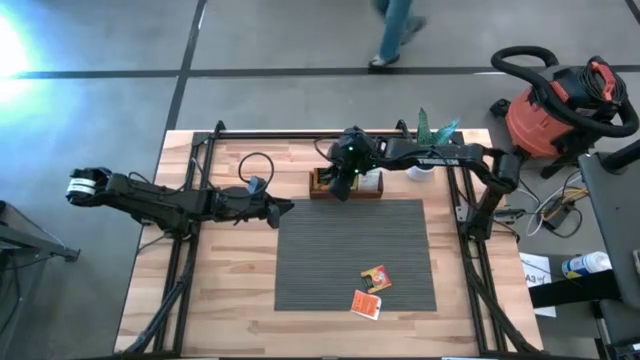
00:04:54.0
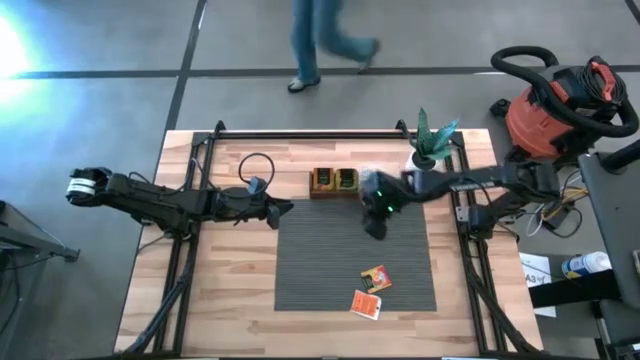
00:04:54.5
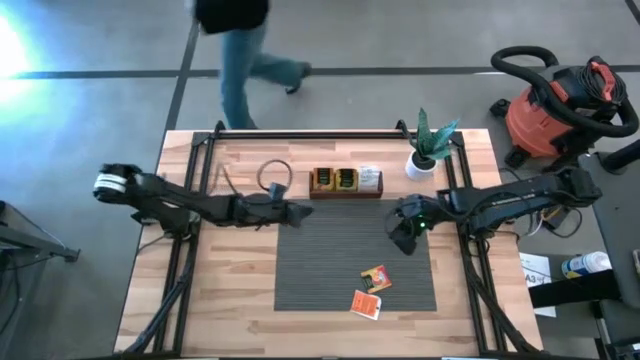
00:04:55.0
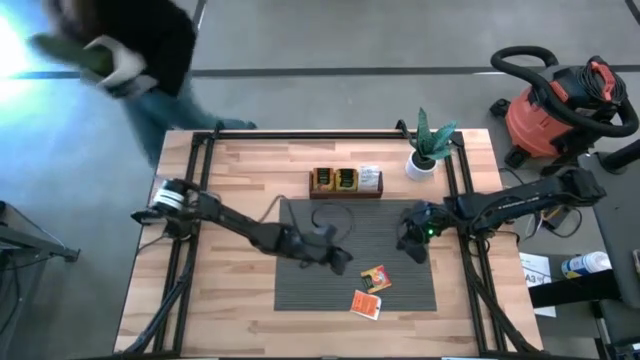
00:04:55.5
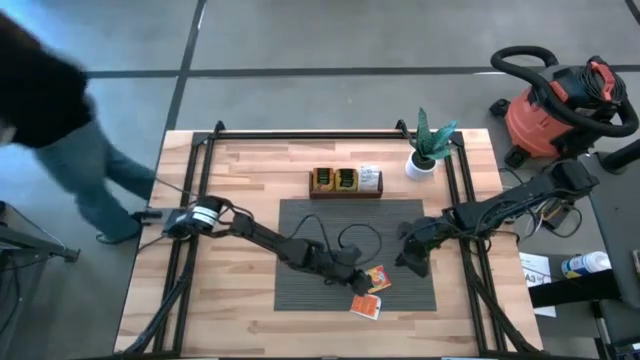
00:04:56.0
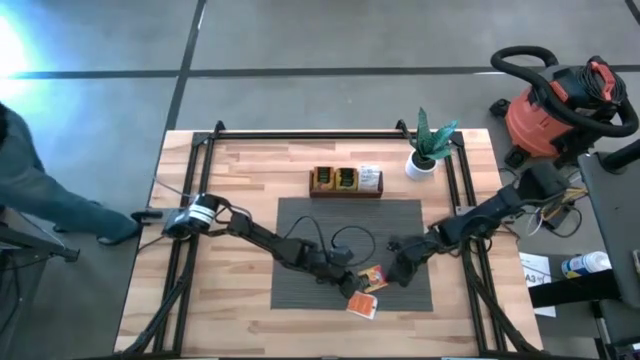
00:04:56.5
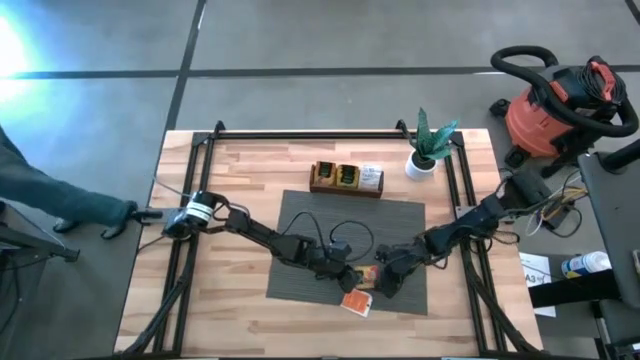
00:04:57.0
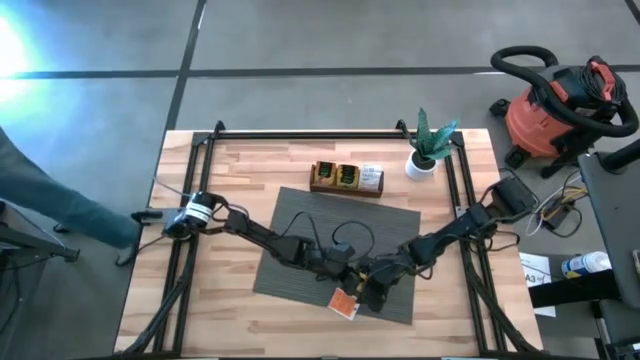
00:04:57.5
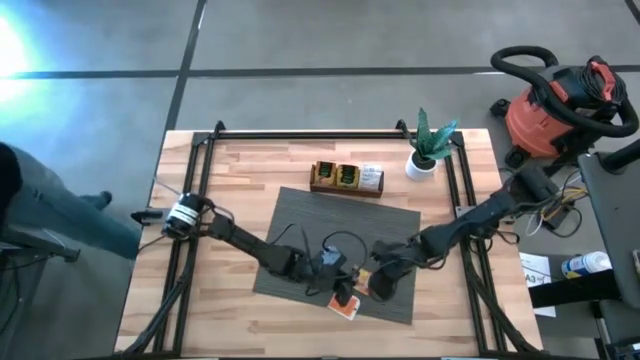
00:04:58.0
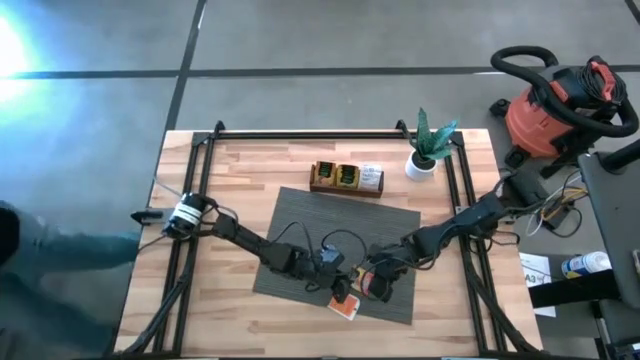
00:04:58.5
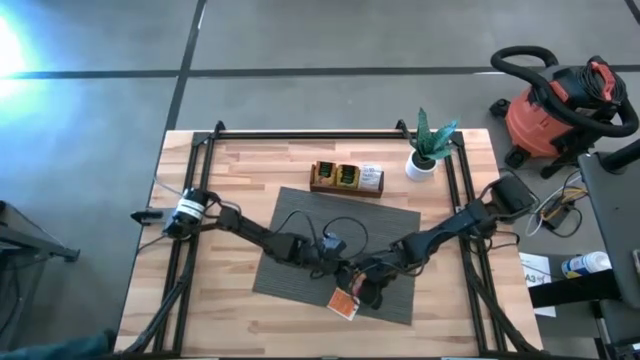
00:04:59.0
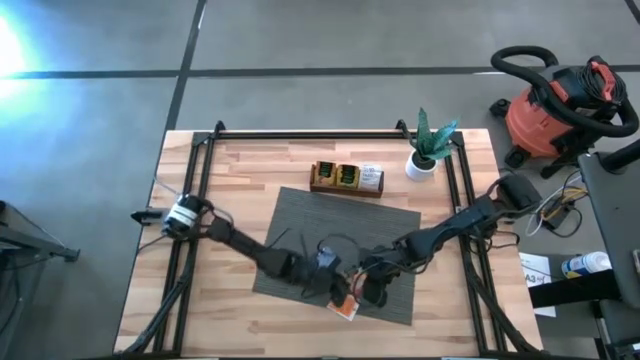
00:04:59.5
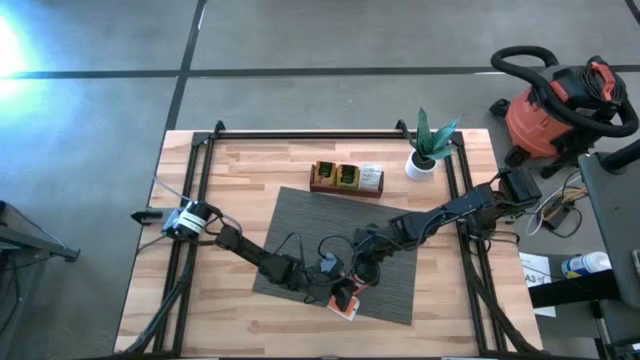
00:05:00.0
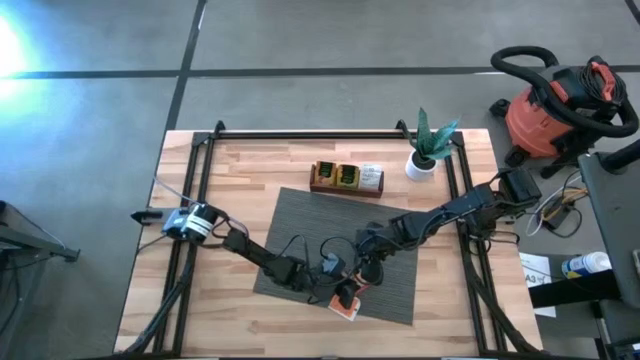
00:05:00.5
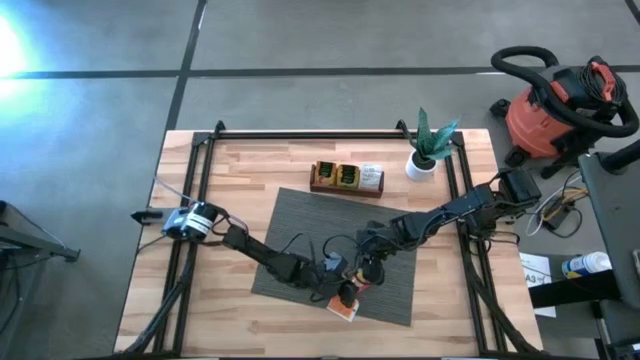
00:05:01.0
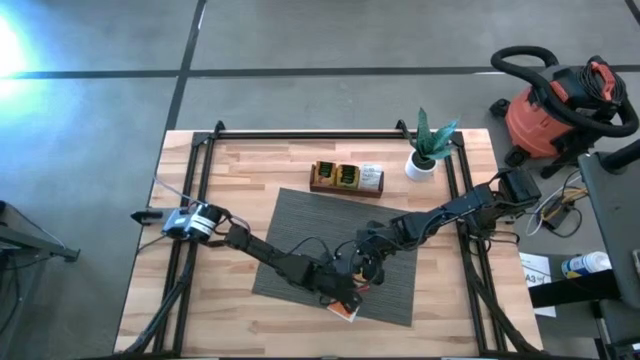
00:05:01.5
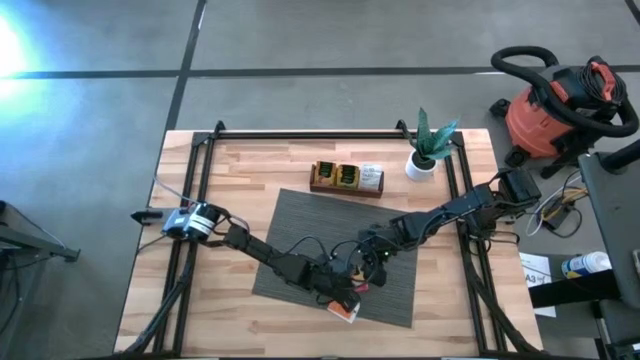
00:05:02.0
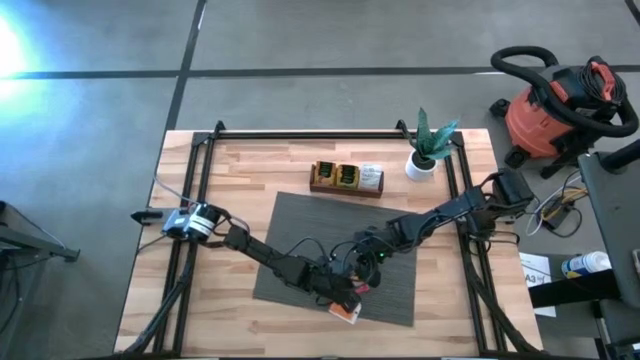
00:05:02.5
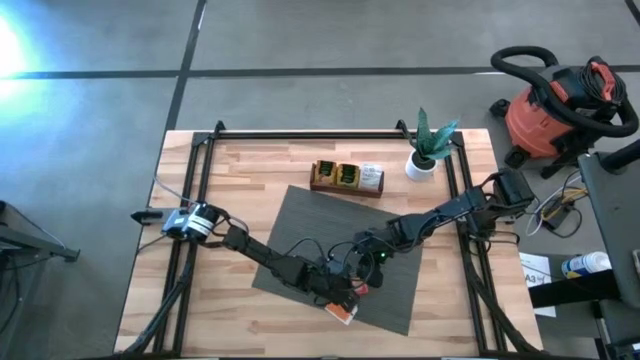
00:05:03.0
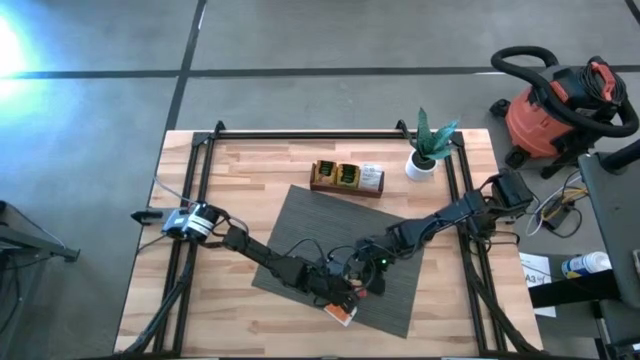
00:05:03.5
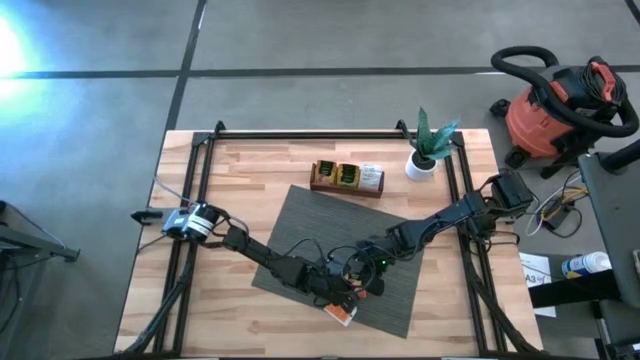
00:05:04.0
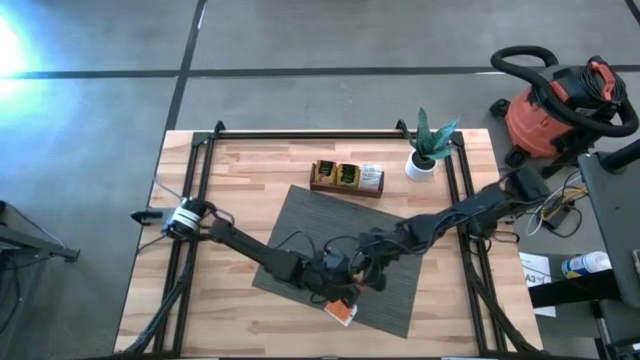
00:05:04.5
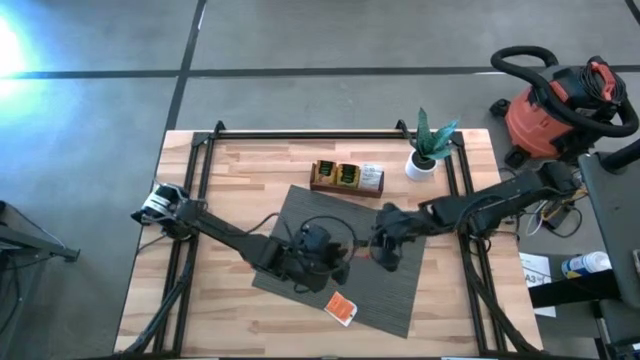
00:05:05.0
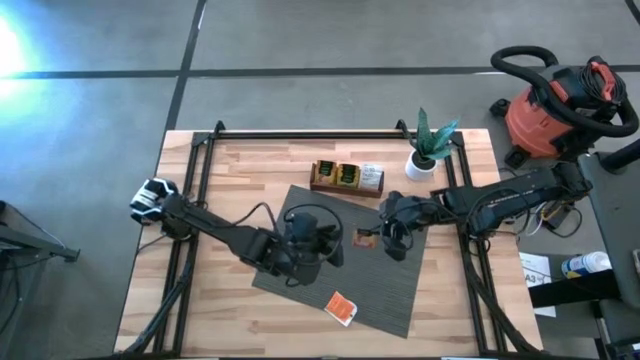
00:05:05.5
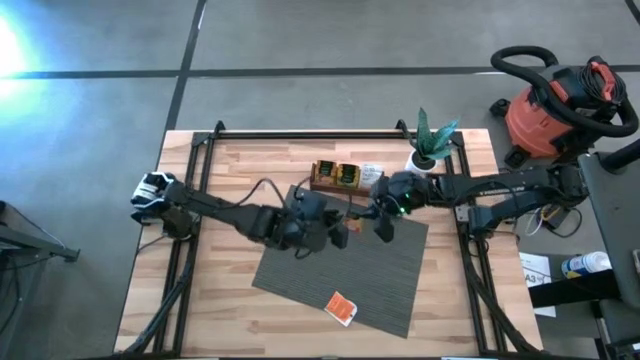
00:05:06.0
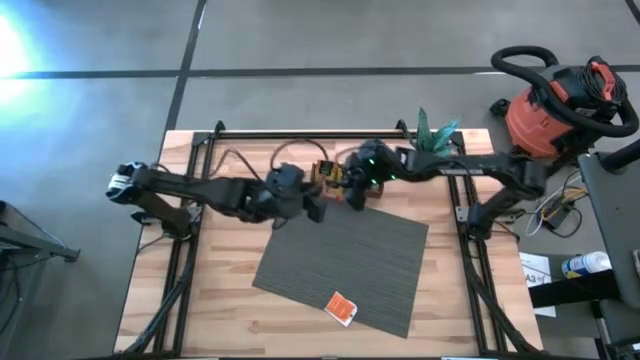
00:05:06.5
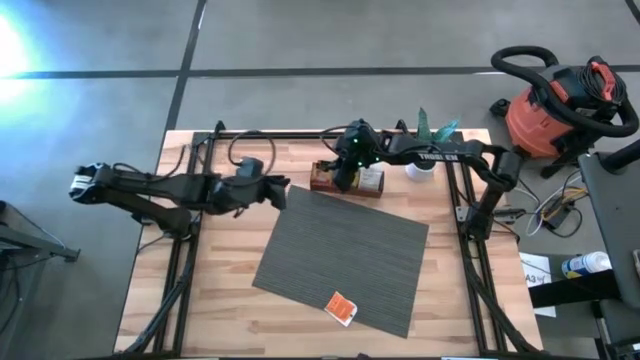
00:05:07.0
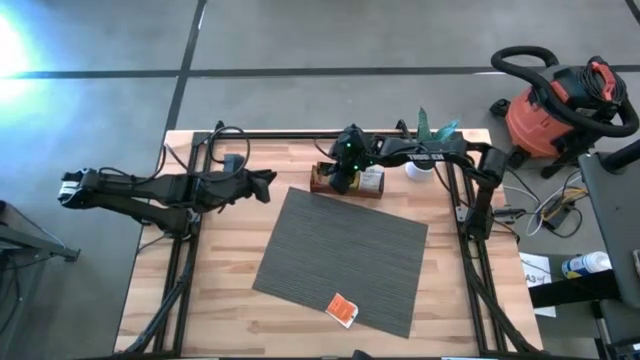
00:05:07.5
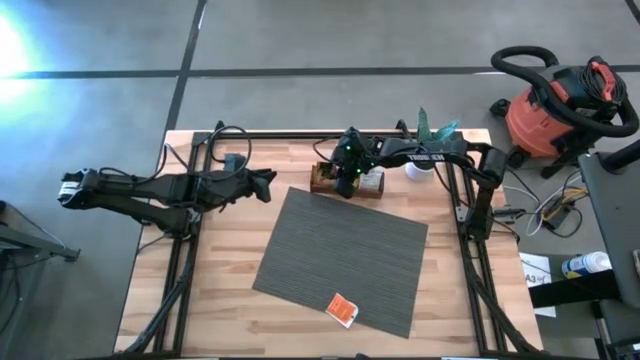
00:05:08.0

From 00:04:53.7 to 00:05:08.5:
Task: Pick & Place Tea
Put the orange tea bag into the left section of the wooden organizer

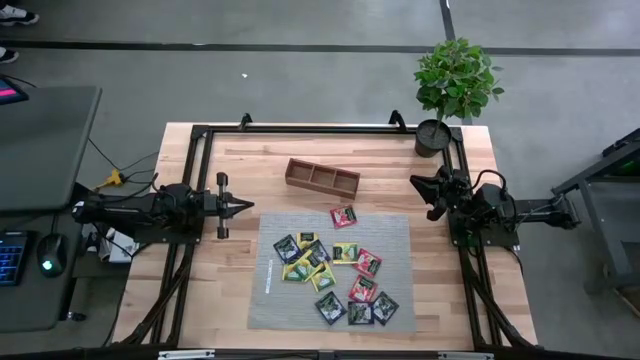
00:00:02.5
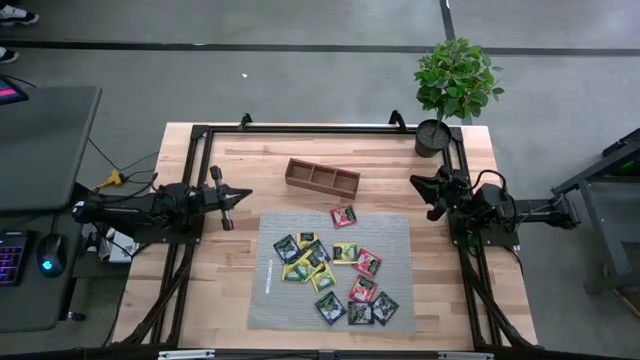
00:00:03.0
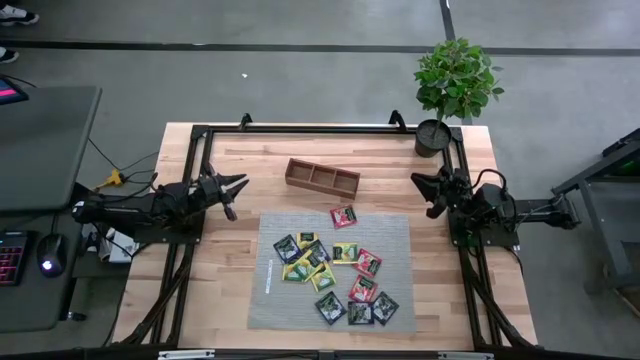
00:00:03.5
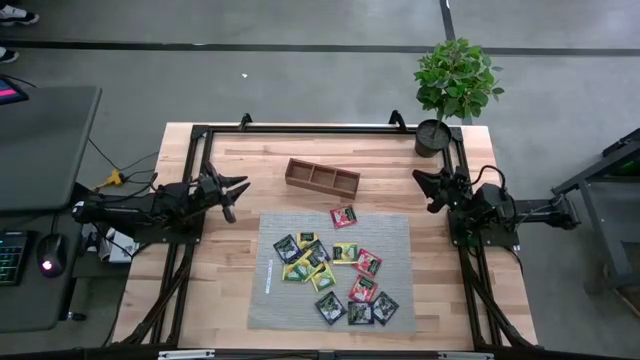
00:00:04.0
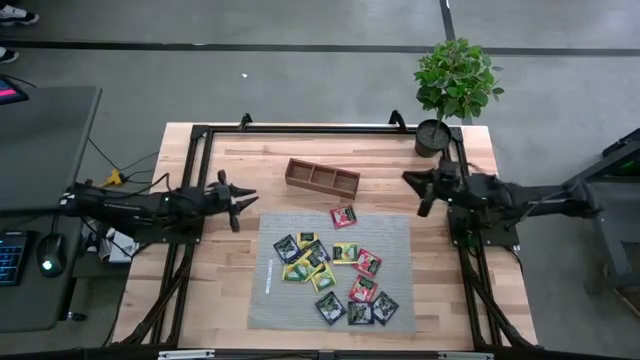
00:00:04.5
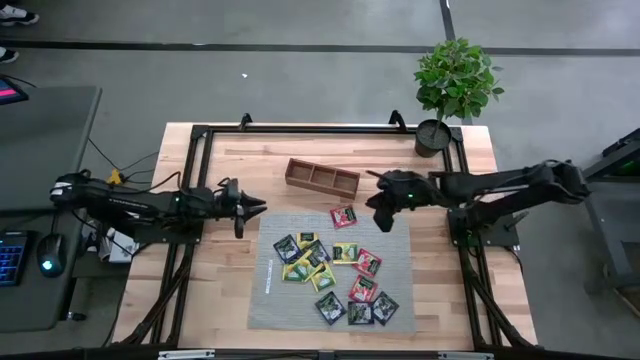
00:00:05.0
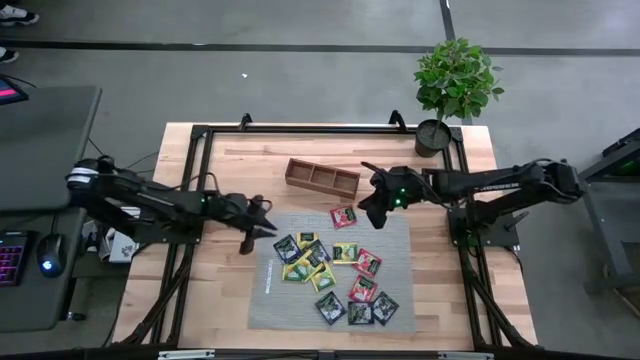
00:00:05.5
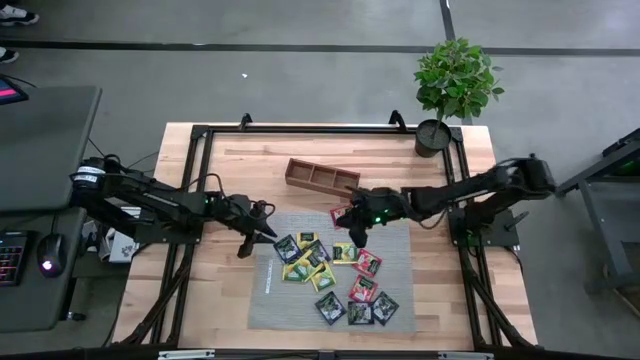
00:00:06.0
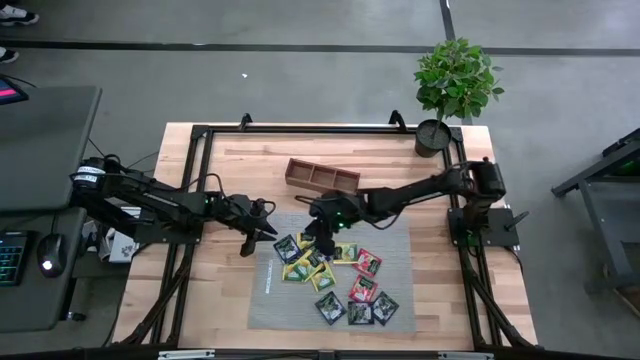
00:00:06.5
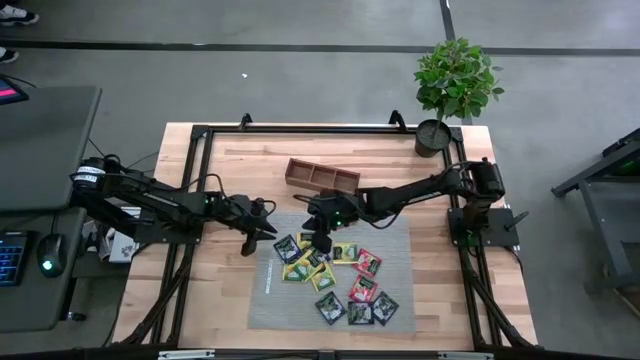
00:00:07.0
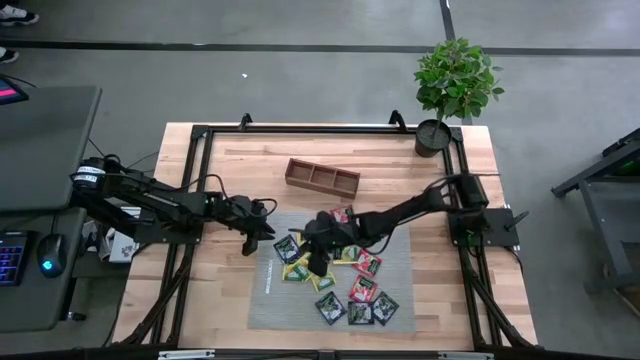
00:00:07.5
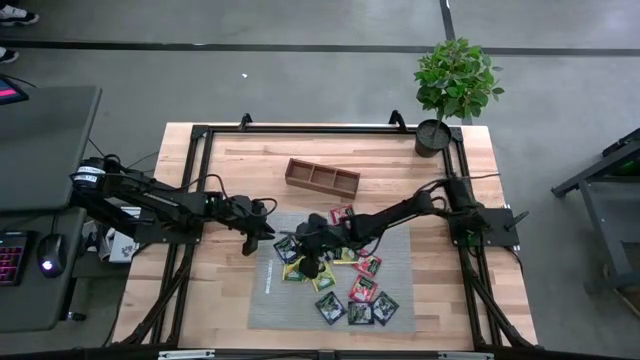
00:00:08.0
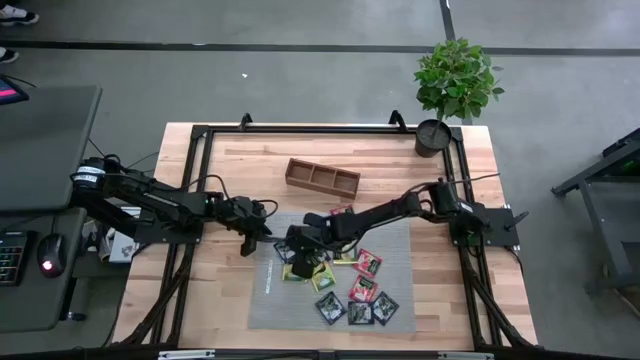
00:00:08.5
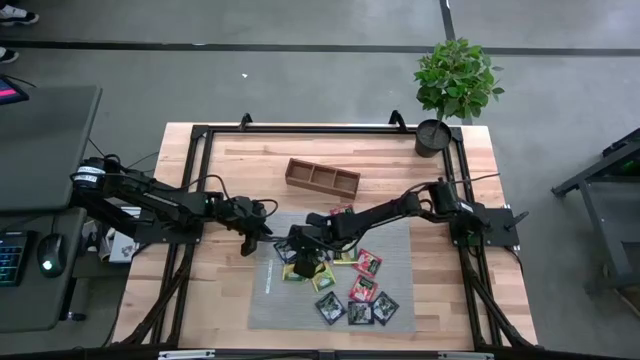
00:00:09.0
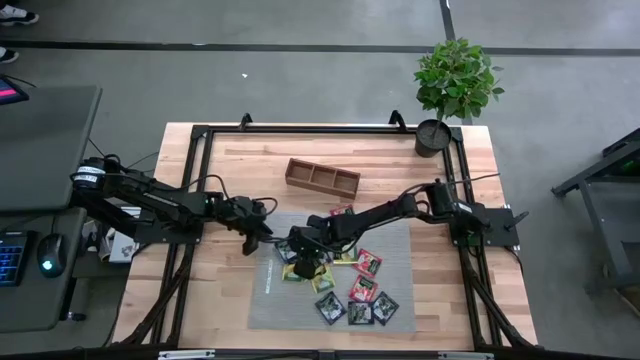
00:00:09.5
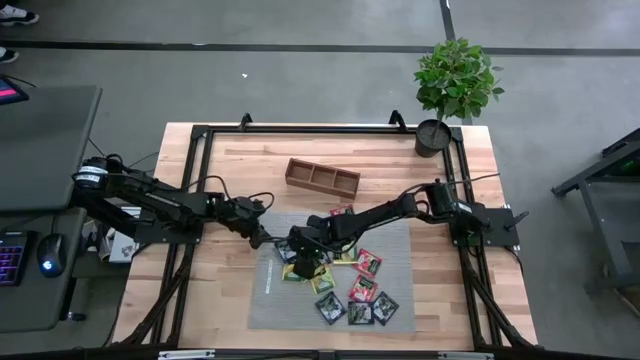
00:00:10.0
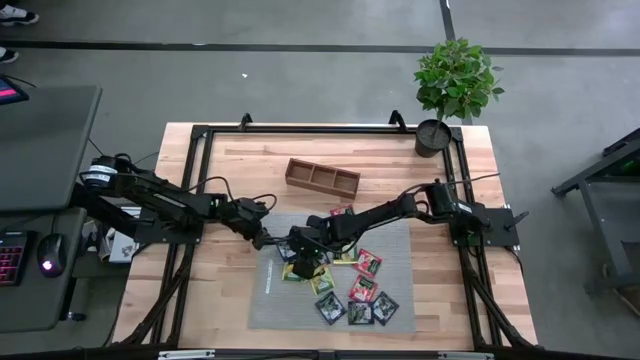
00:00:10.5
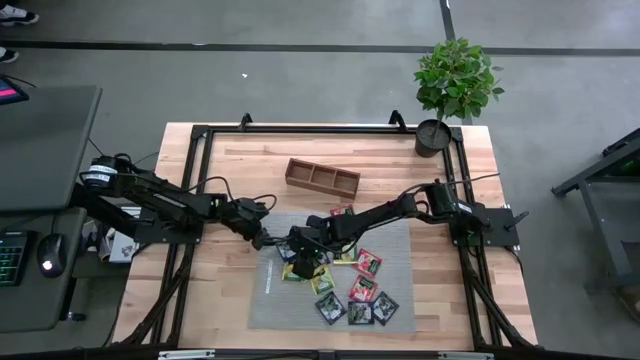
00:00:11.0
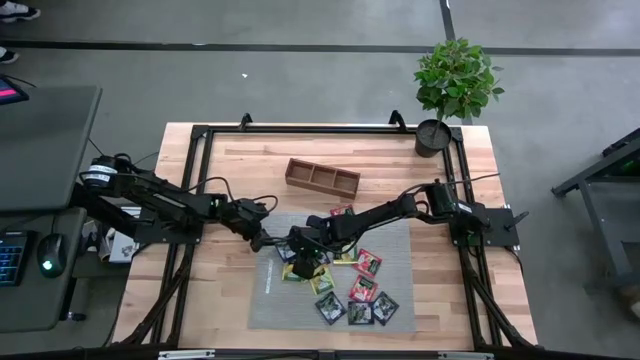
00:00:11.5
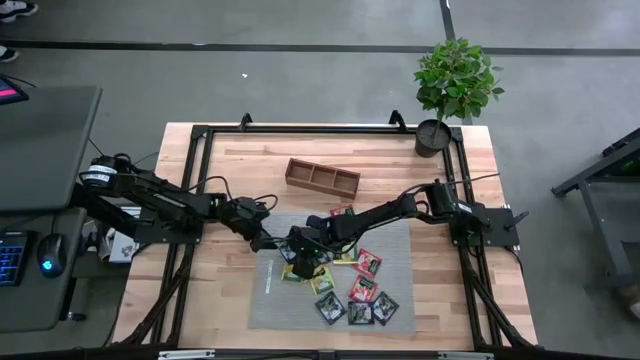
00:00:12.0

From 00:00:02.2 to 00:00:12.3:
Task: Pick & Place Tea
Put the purple tea bag into the left section of the wooden organizer
